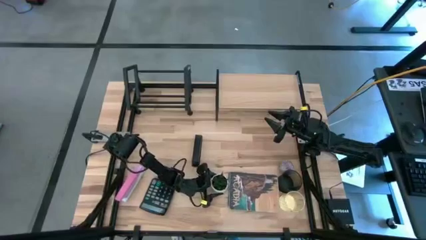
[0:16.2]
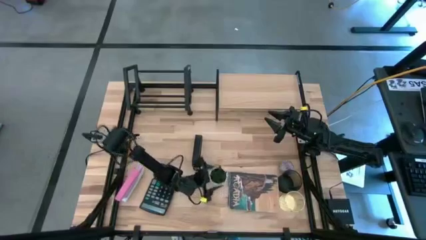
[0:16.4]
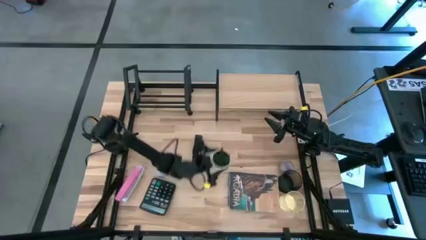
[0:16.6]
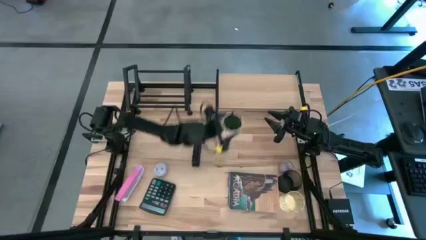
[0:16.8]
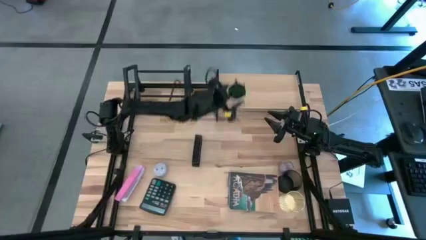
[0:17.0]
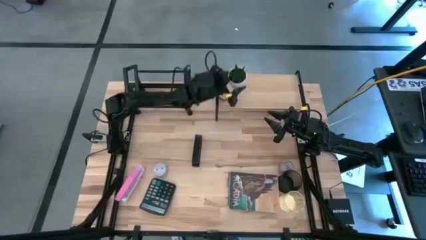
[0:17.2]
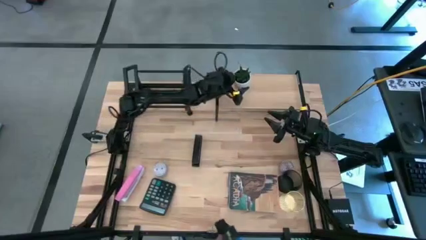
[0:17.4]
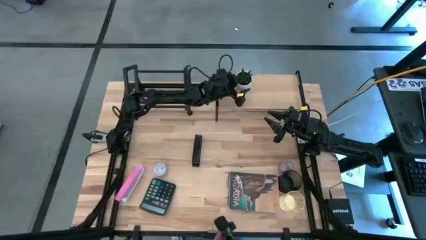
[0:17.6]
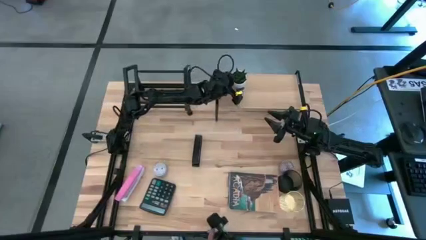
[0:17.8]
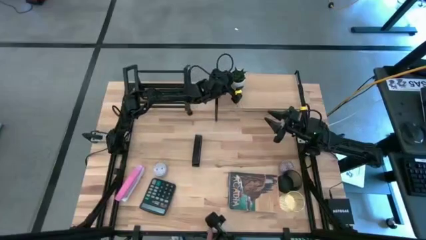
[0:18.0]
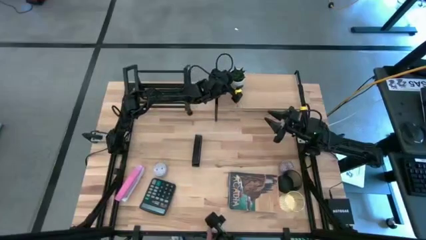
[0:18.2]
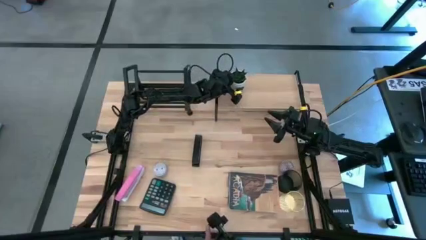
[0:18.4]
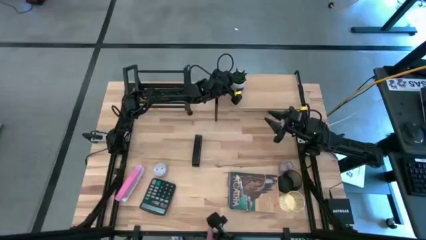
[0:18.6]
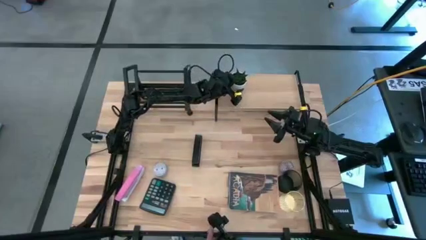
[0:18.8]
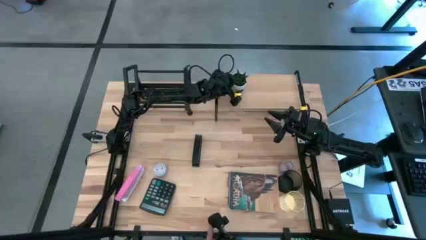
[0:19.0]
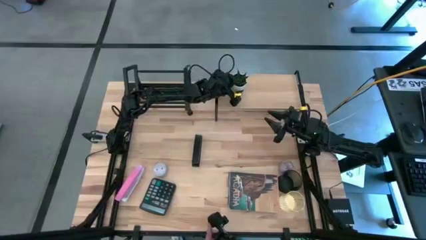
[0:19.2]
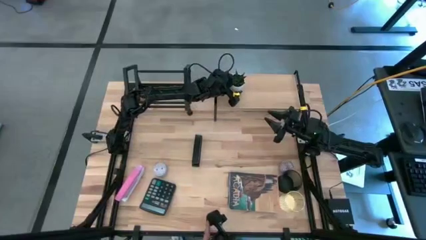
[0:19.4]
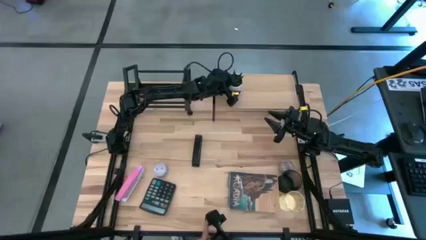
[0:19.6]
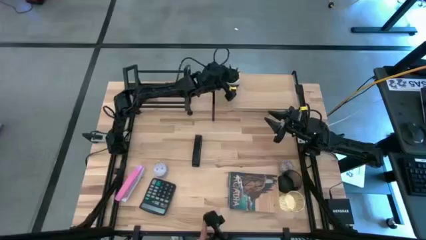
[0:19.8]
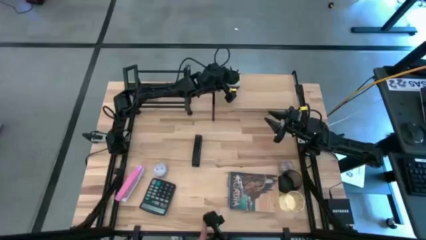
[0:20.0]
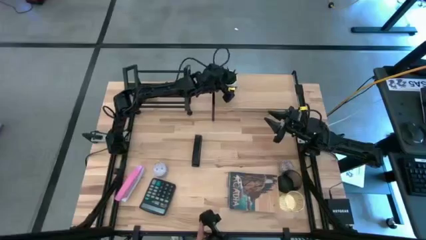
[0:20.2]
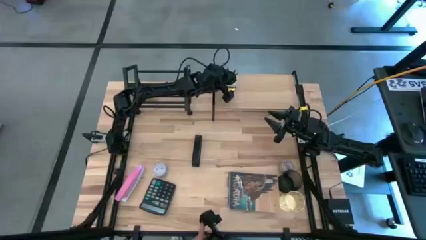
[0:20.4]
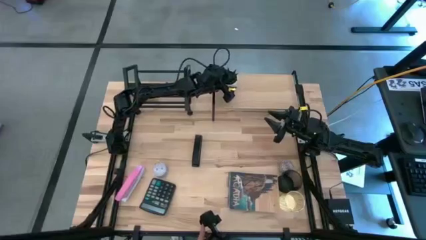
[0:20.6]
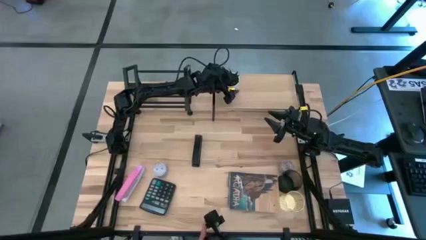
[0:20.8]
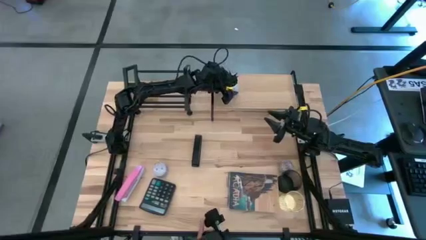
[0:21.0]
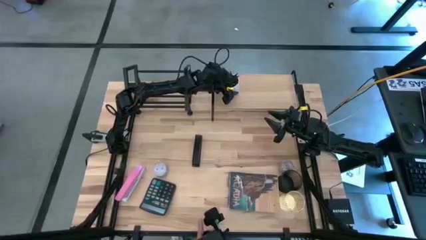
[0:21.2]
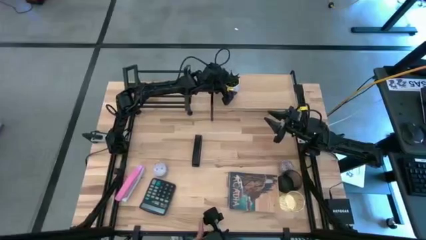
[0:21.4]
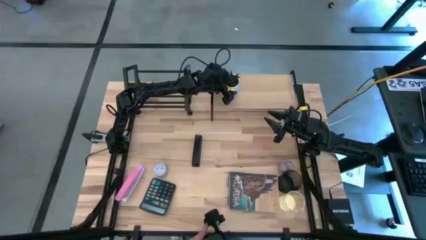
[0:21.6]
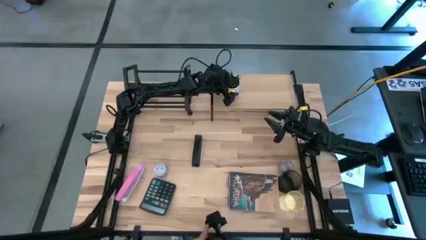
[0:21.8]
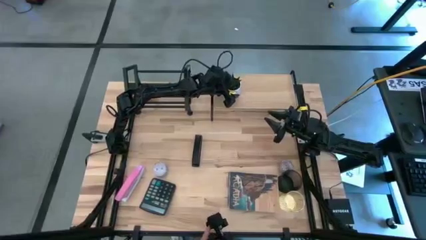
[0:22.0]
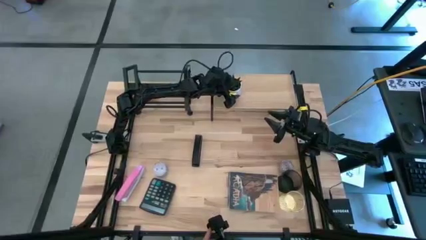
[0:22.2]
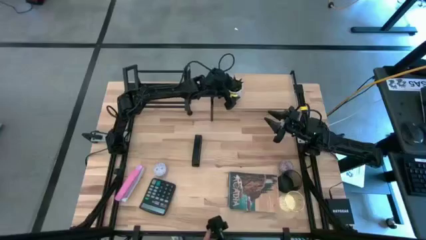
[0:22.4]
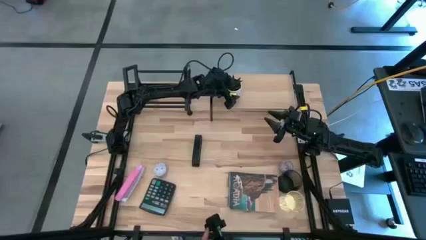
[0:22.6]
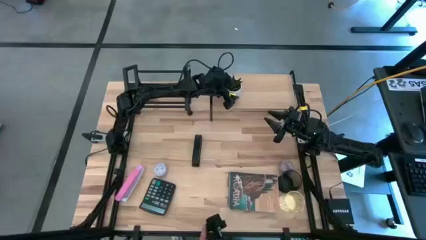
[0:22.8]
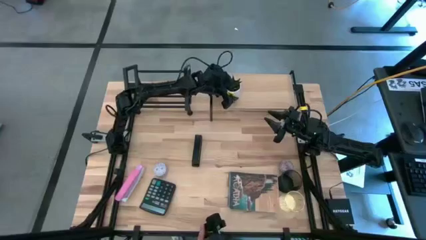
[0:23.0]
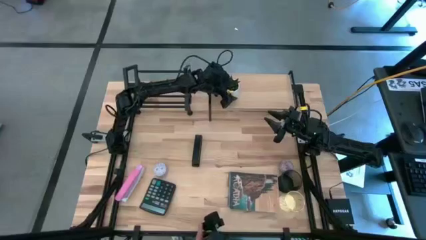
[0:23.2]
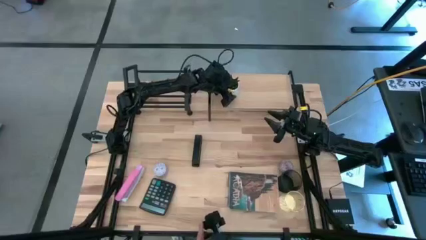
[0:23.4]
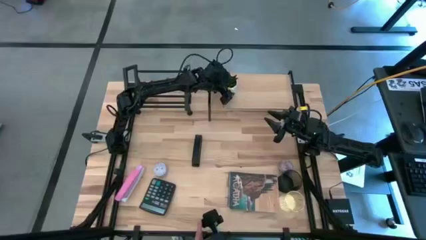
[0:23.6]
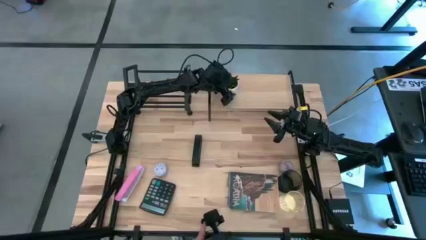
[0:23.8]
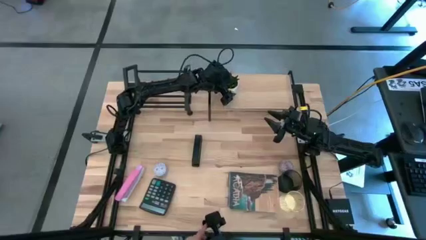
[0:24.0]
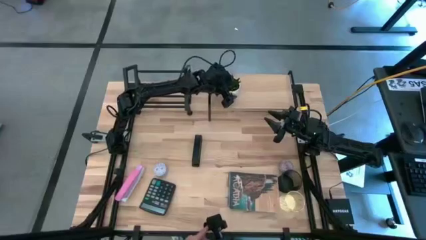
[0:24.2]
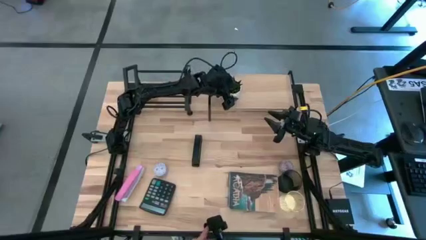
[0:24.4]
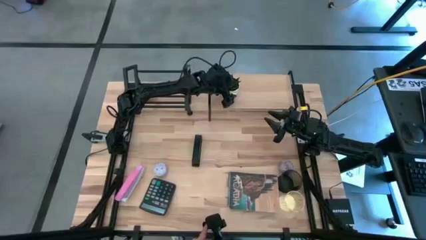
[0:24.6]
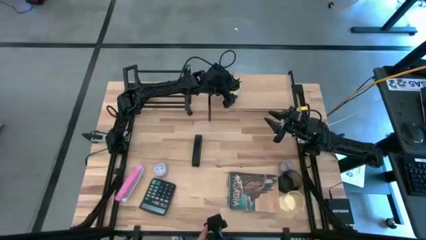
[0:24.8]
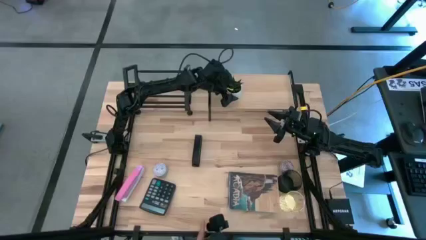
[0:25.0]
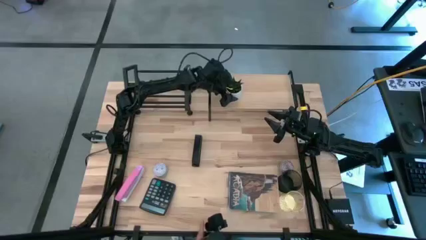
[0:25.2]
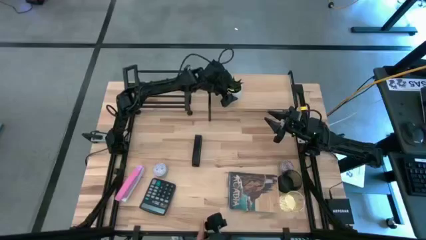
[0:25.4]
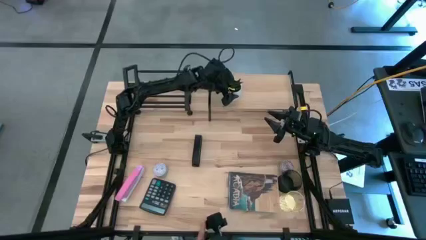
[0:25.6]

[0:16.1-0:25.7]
Task: Stock shelves
Put the potted plant onto the shelf

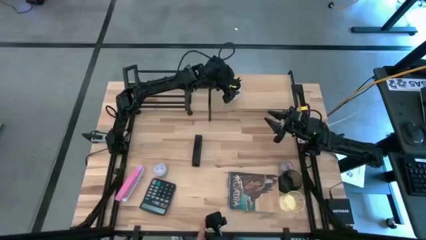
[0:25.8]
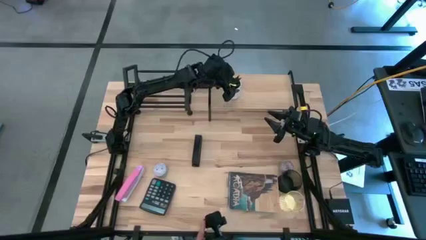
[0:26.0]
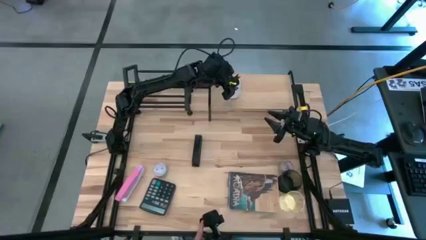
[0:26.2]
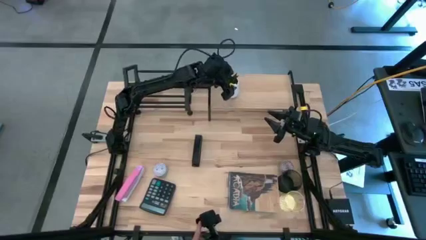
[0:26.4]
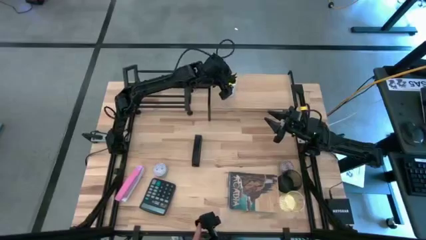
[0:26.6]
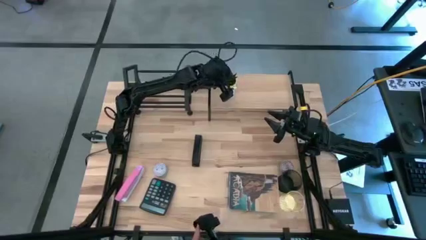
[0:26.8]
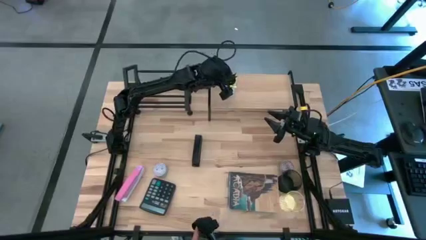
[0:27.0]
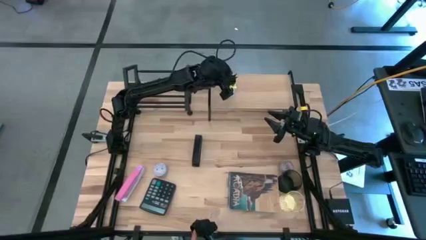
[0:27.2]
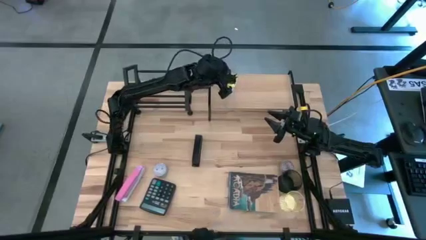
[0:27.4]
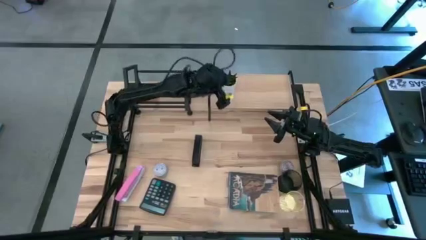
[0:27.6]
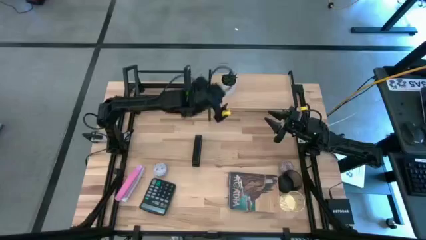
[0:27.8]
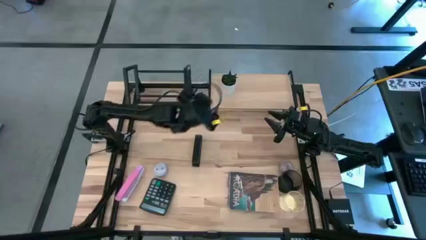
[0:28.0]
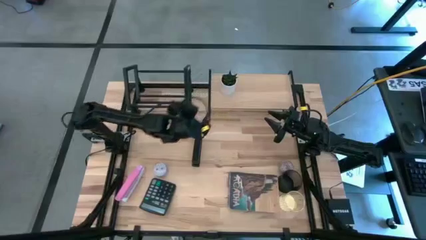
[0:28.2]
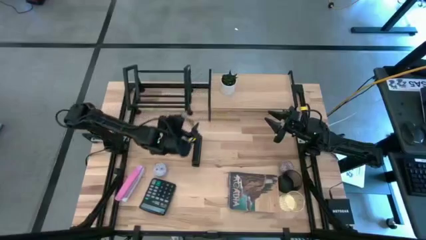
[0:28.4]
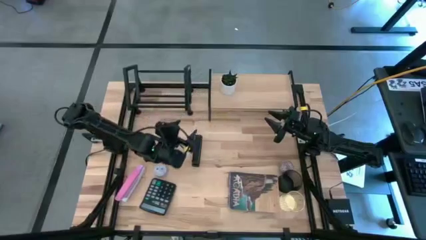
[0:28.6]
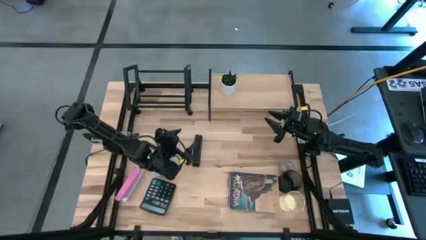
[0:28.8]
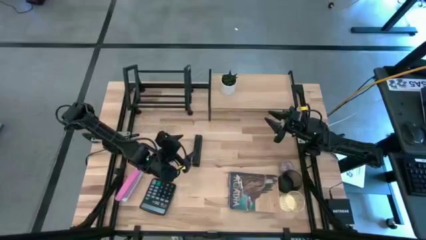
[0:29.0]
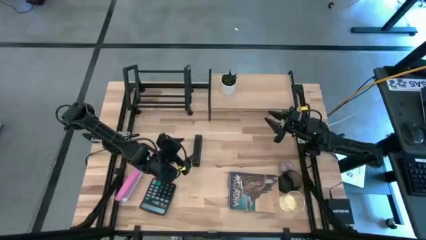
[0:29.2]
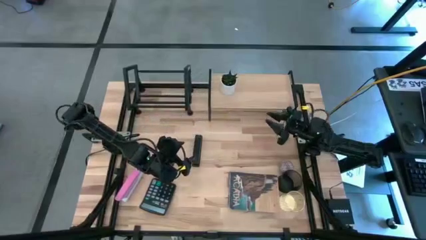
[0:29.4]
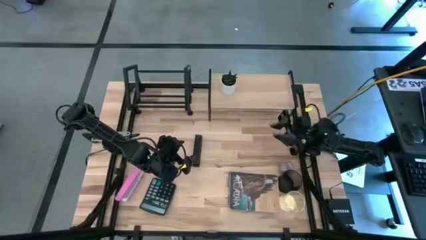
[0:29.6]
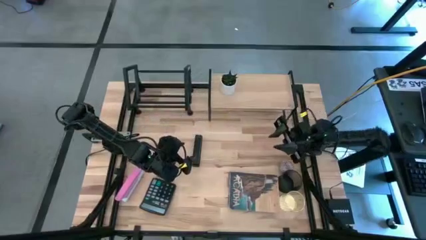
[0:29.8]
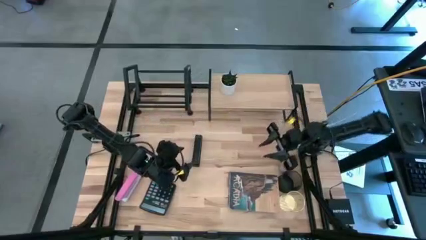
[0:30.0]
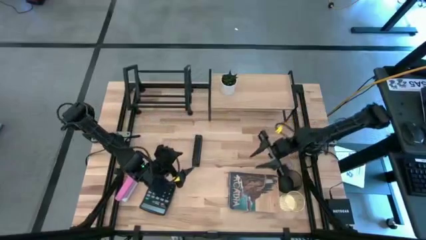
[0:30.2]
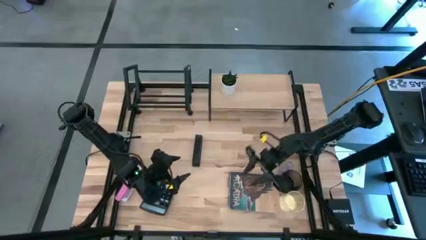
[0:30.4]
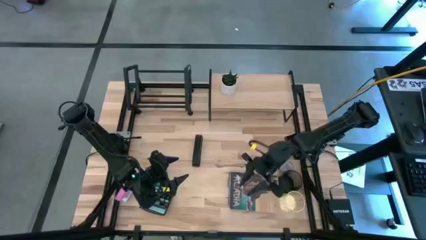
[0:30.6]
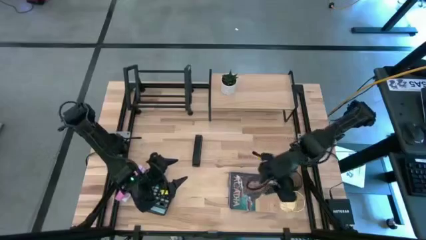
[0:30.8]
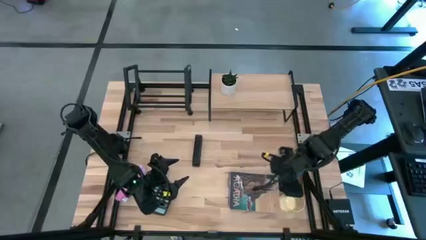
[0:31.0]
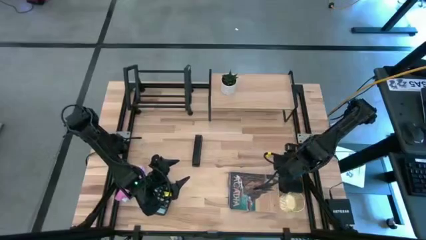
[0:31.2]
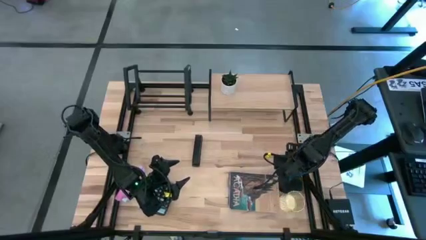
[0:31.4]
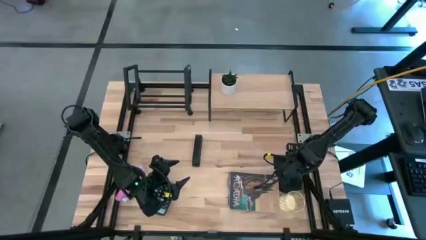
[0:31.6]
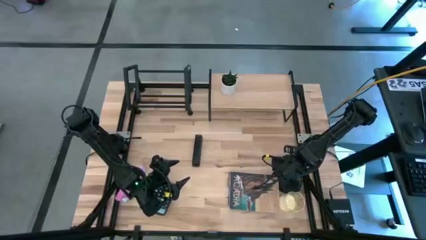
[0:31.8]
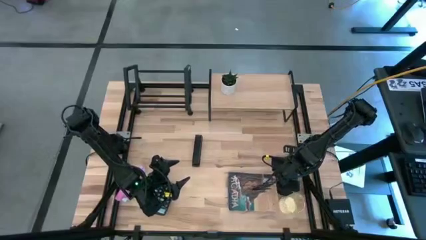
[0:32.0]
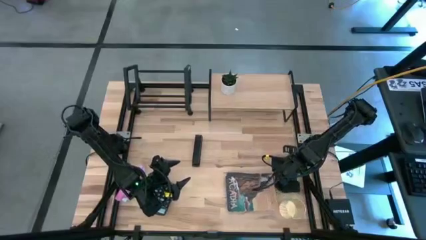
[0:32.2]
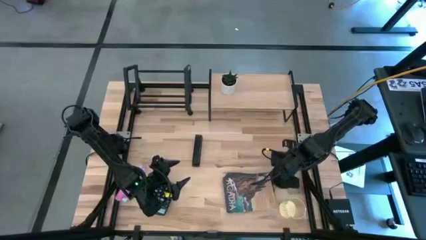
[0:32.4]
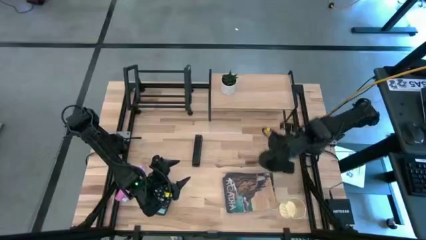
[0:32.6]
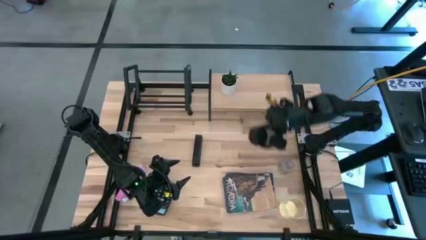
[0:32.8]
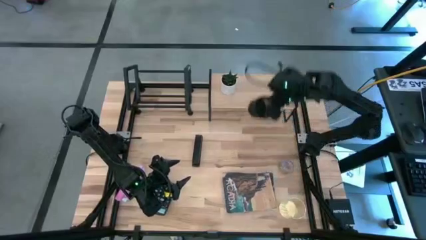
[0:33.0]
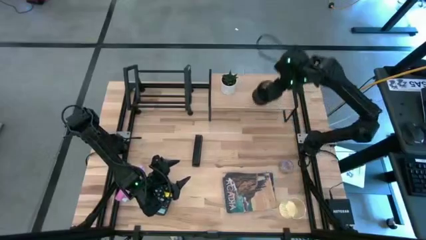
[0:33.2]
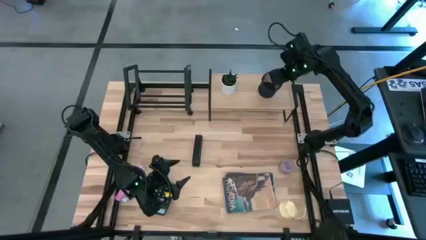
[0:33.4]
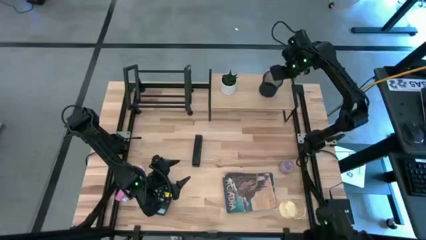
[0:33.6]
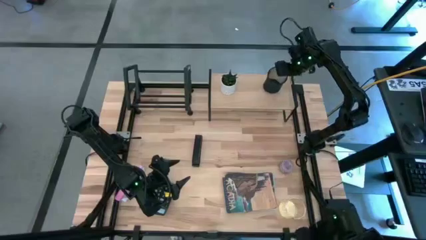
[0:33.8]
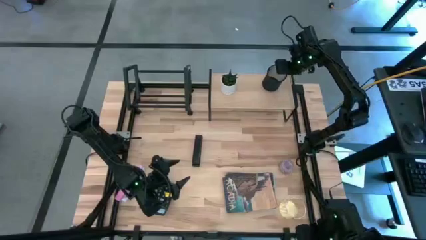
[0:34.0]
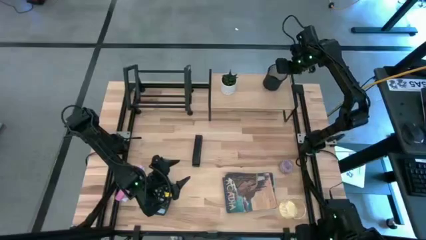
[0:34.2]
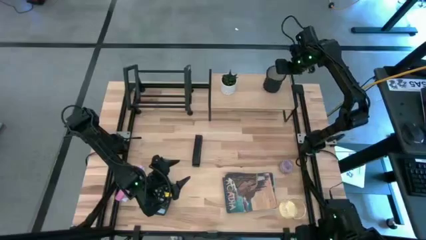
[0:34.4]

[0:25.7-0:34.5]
Put the black pen holder onto the shelf
